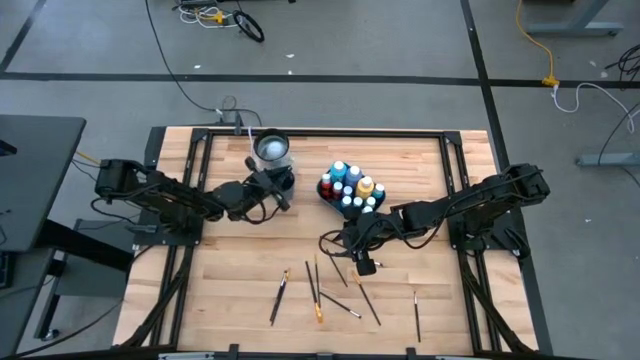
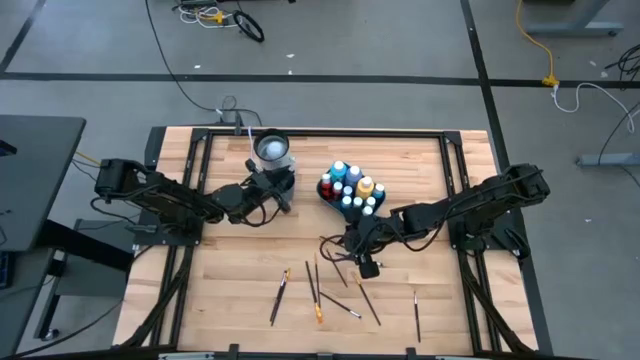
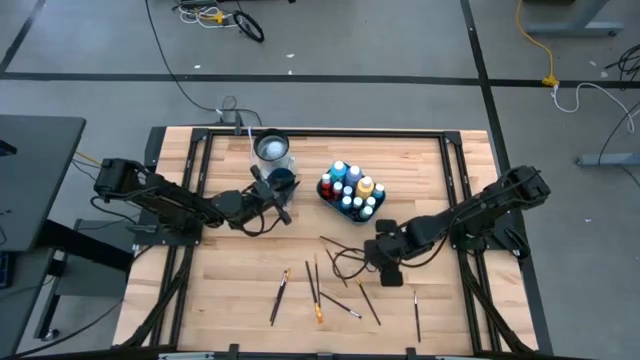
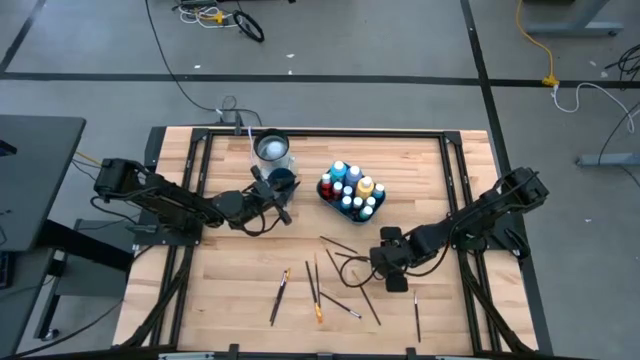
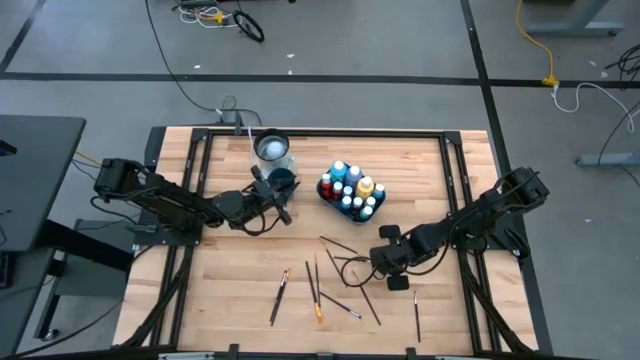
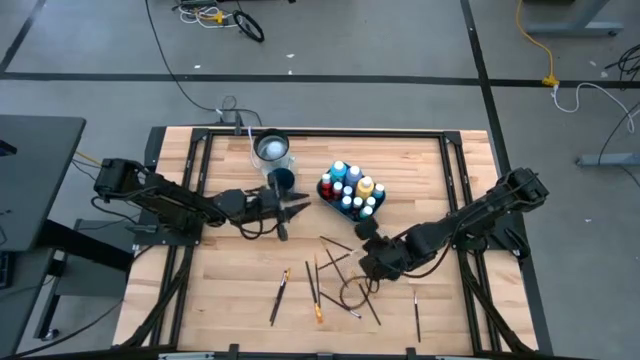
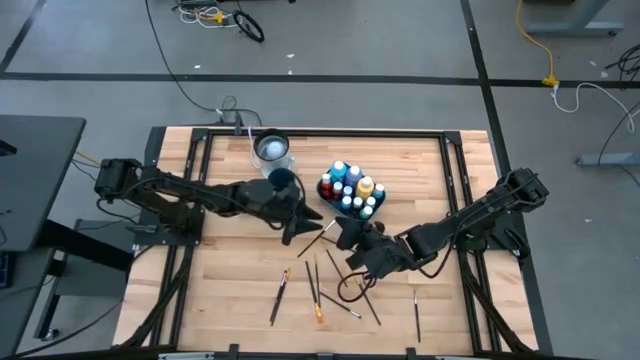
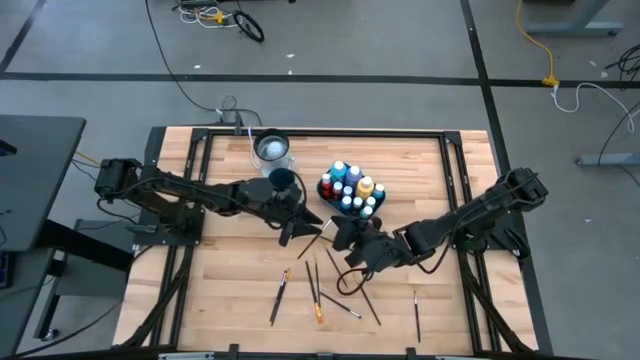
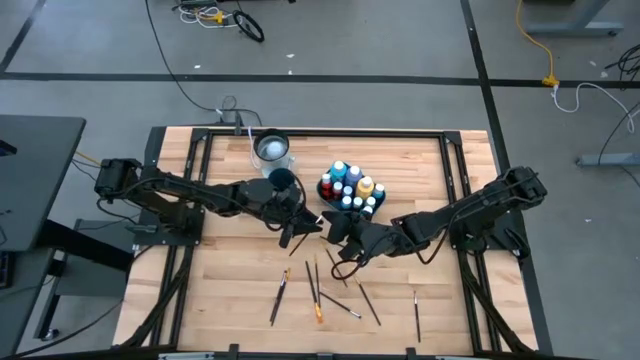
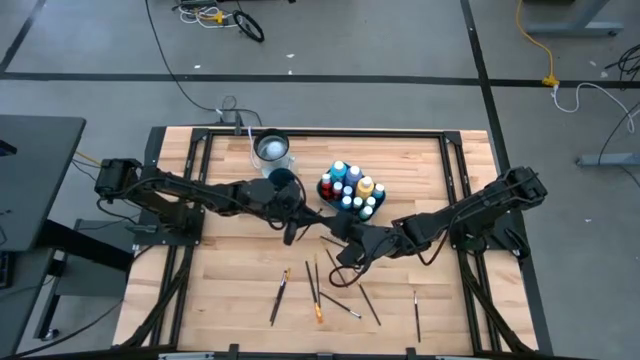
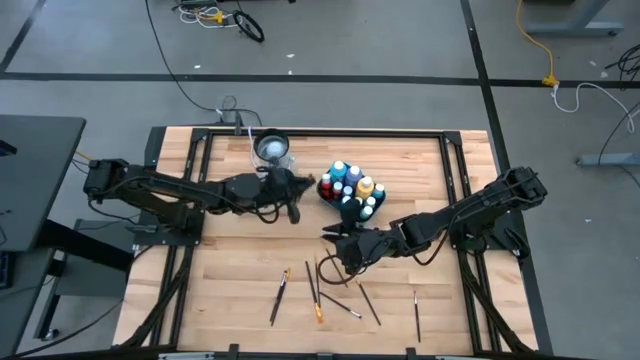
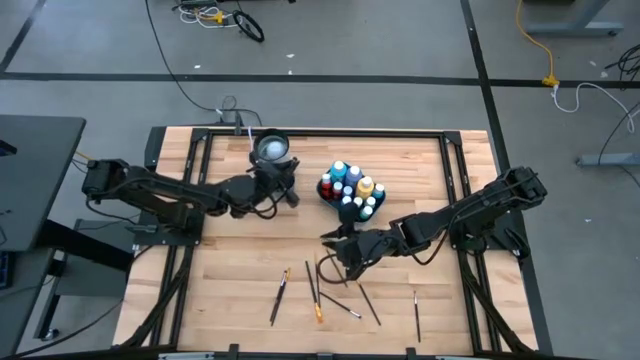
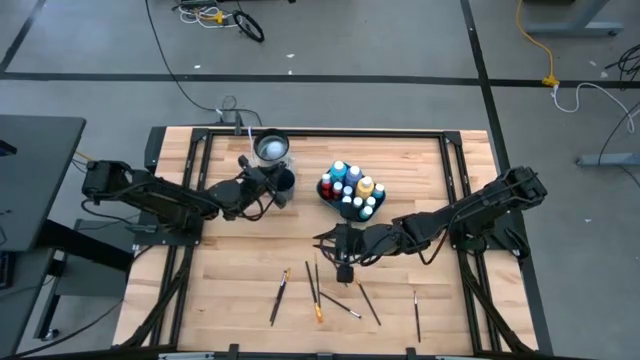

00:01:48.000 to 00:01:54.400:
Task: Pick & Place Paint Supplies
Put the silver paint brush into the blue cup

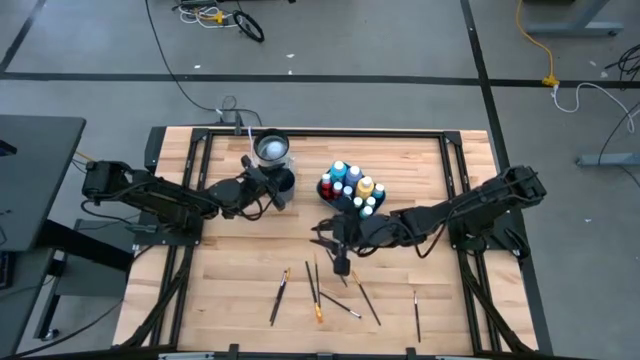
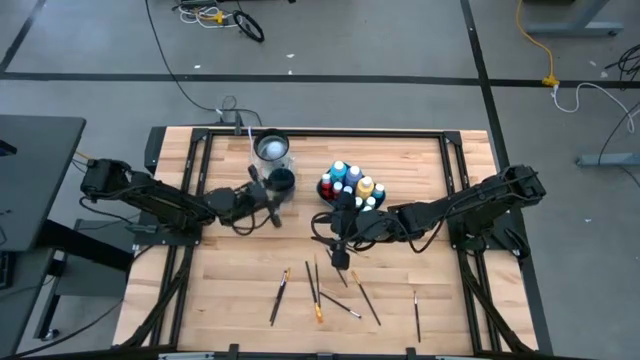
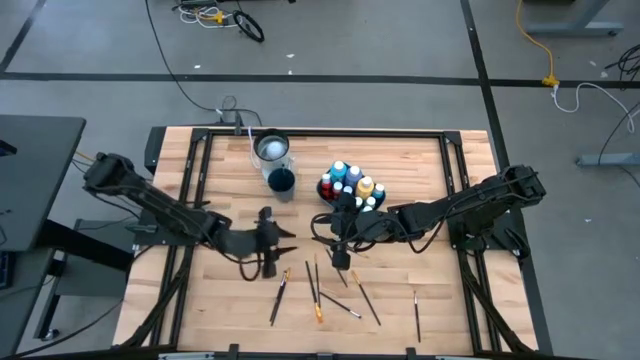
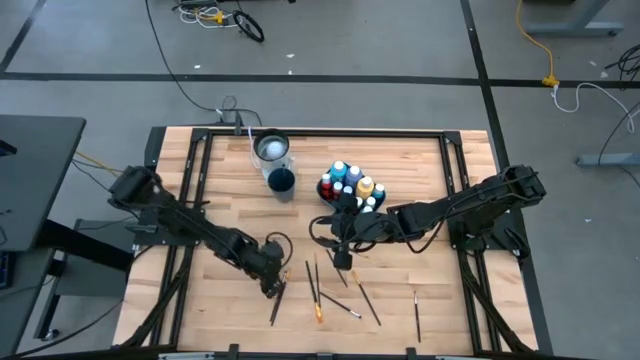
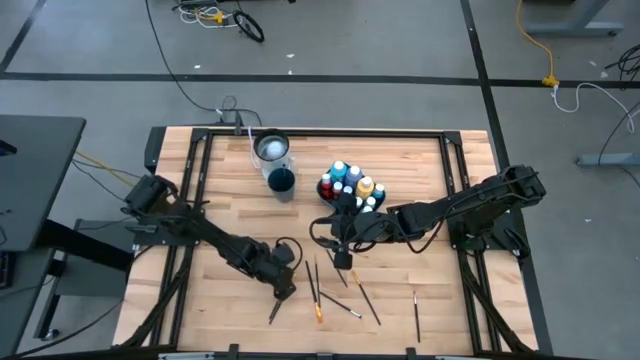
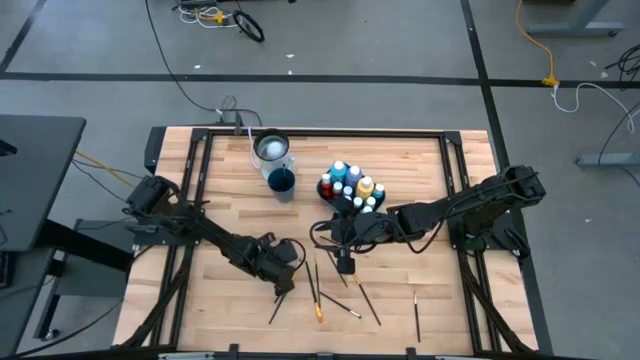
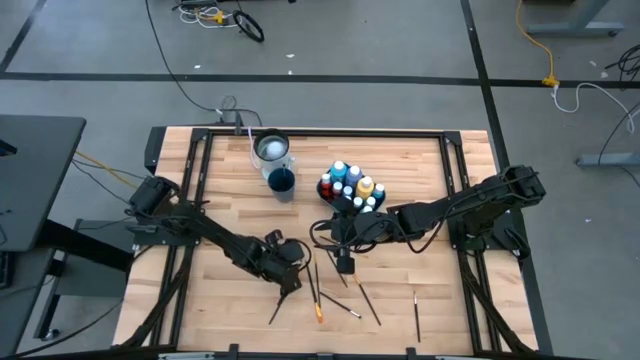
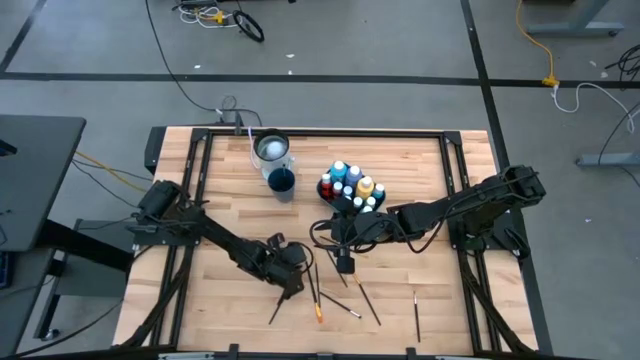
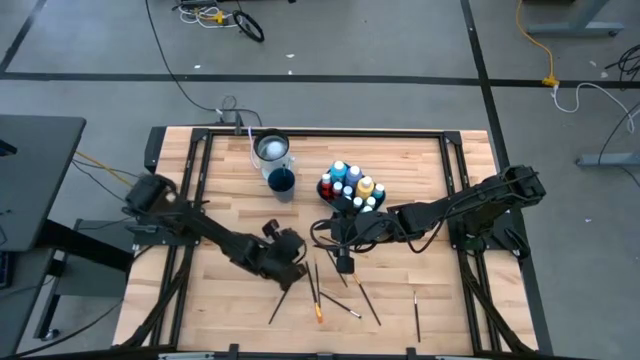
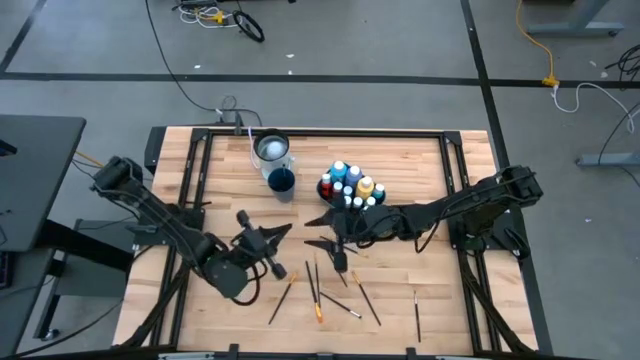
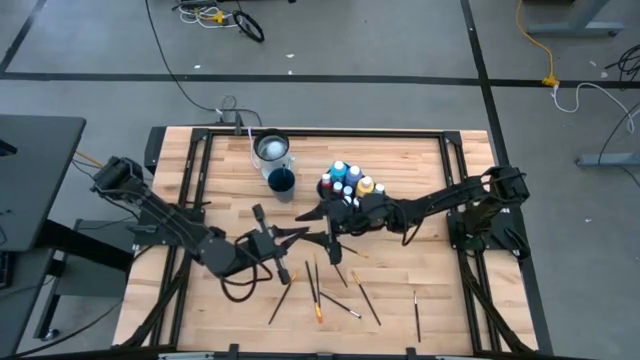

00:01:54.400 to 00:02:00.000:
Put the silver paint brush into the blue cup

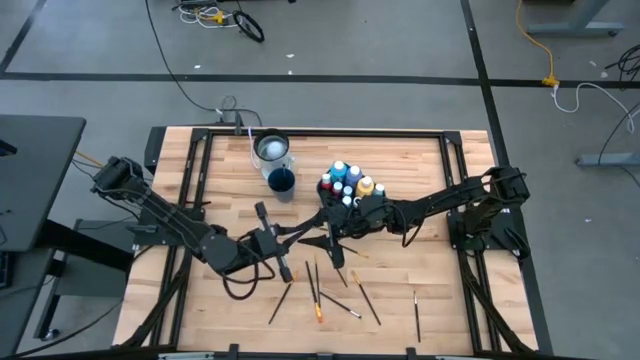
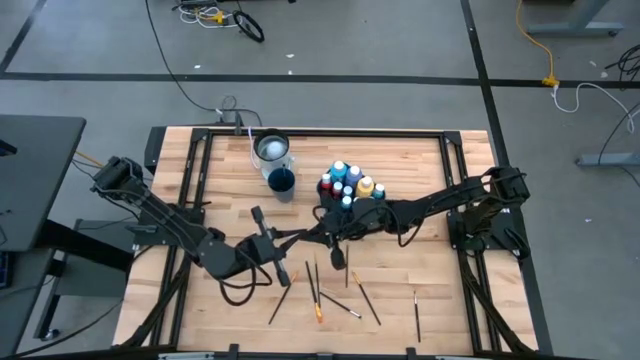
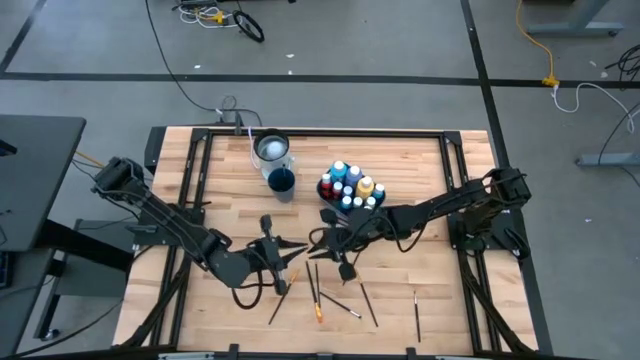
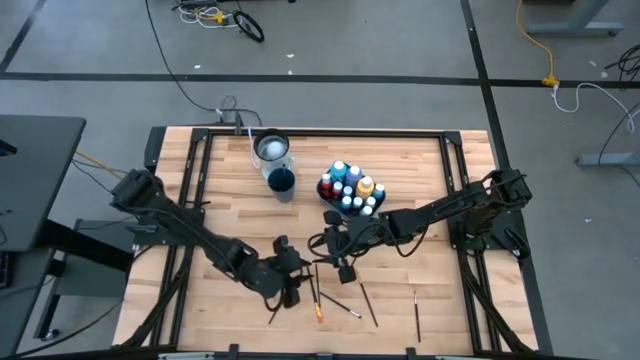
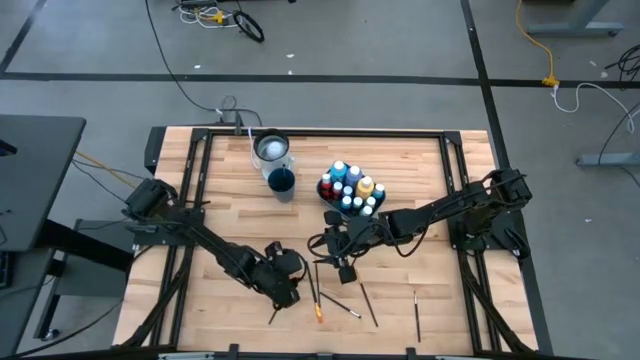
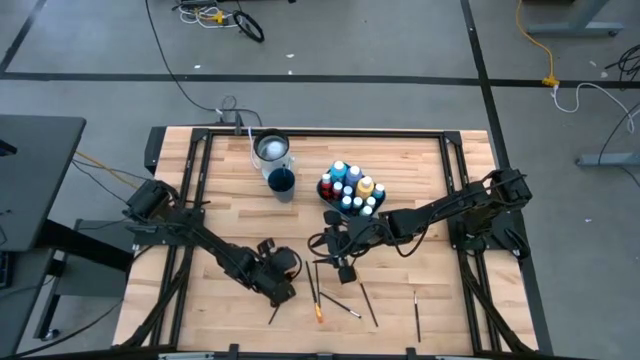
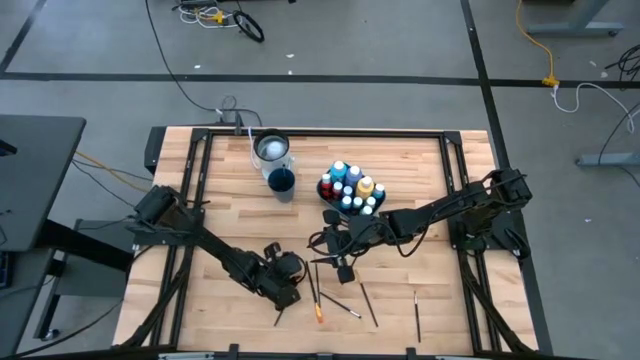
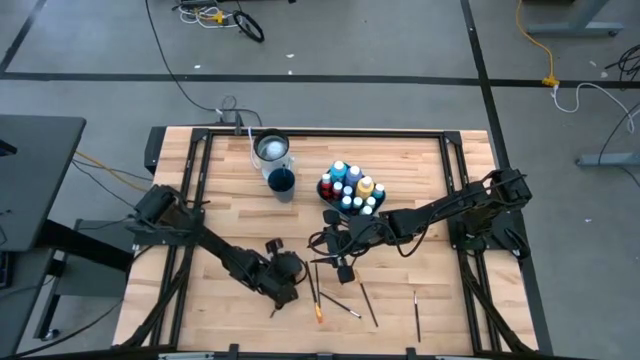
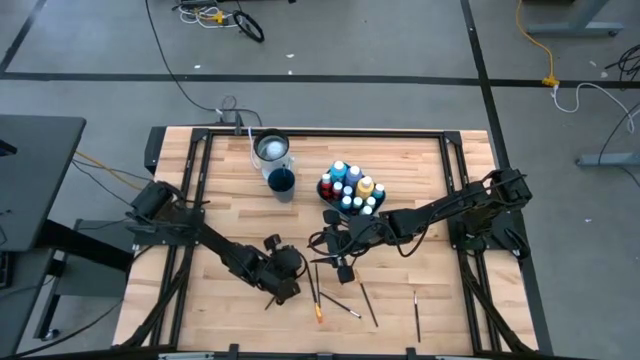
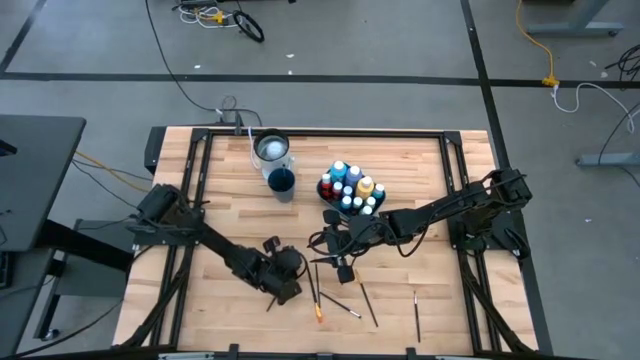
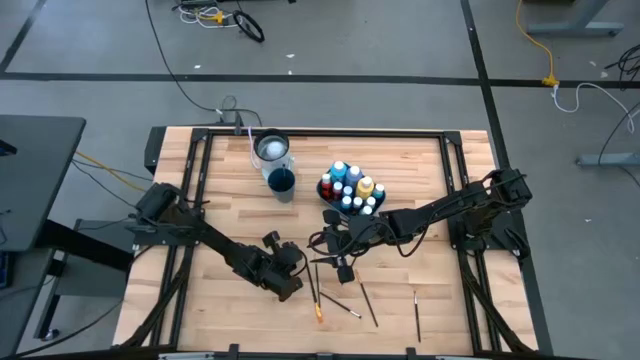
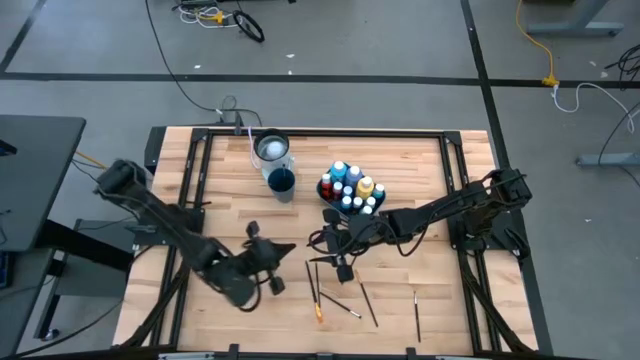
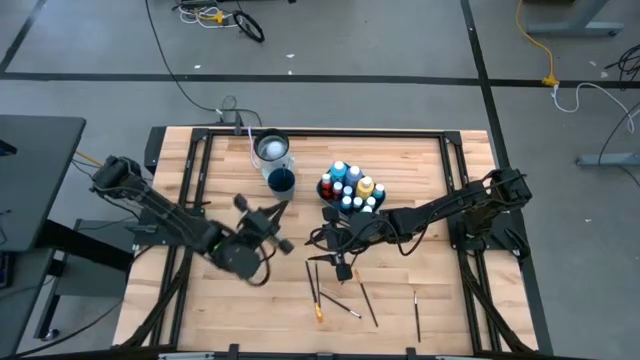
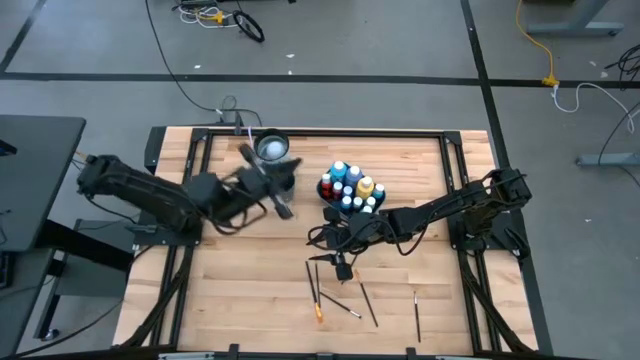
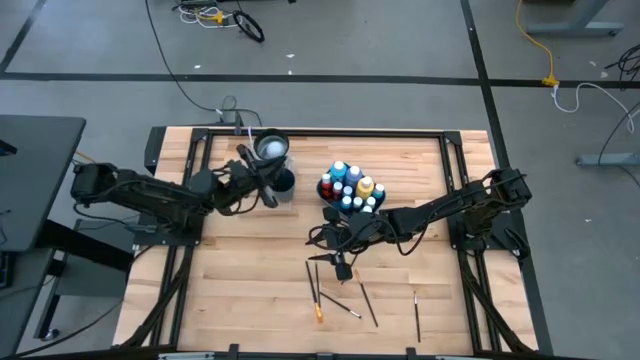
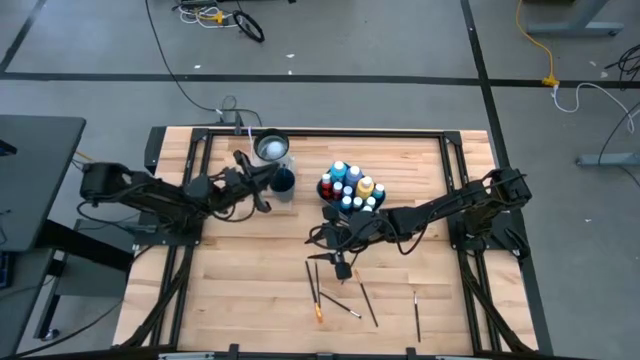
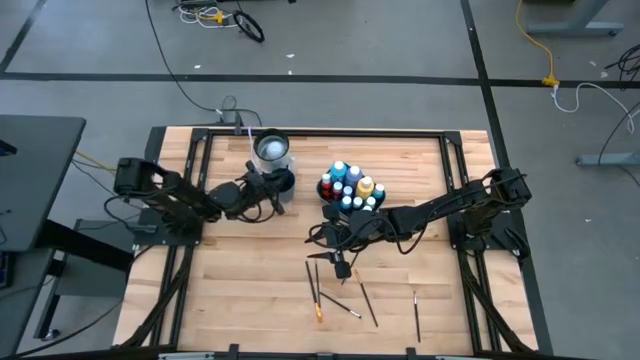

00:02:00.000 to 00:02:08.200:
Put the gold paint brush into the blue cup
